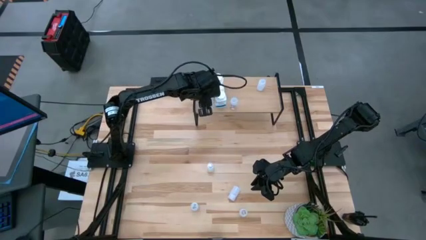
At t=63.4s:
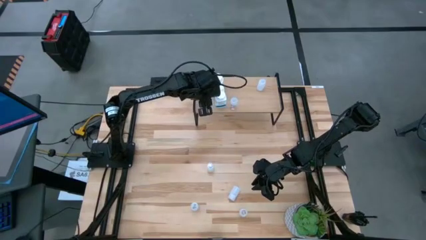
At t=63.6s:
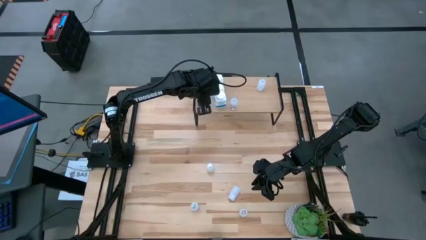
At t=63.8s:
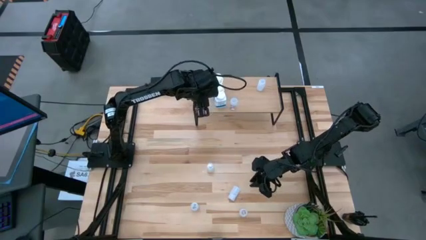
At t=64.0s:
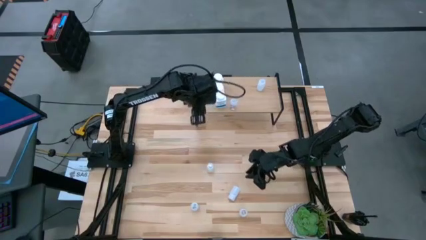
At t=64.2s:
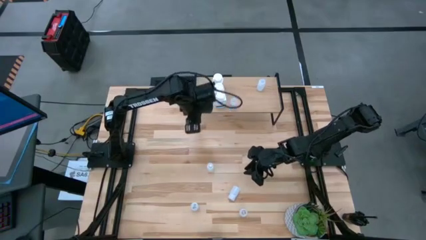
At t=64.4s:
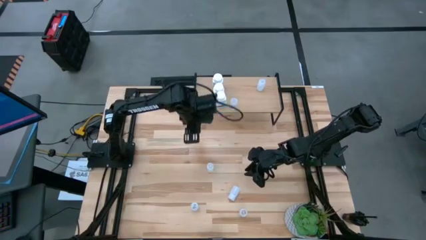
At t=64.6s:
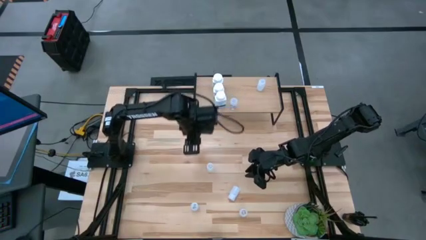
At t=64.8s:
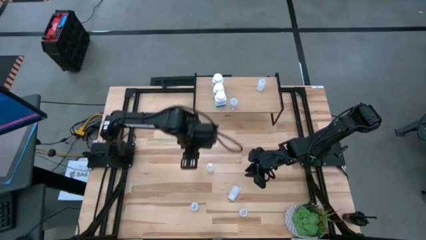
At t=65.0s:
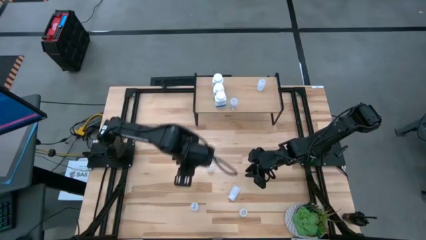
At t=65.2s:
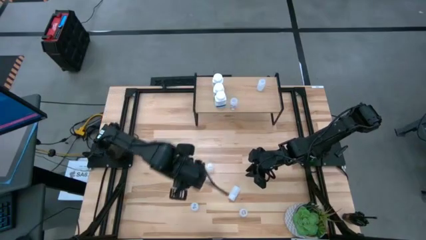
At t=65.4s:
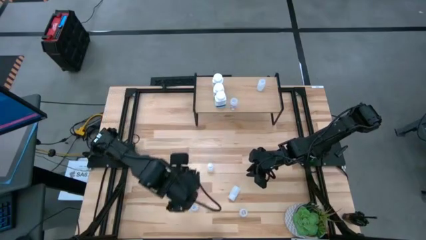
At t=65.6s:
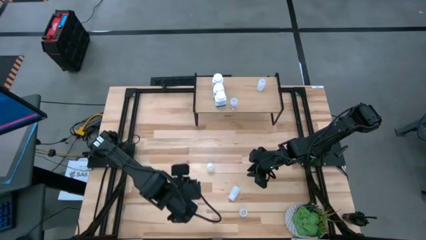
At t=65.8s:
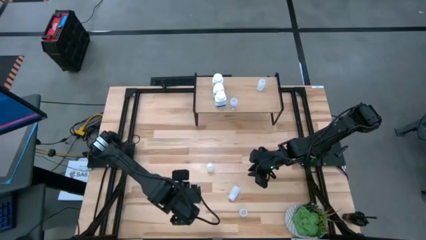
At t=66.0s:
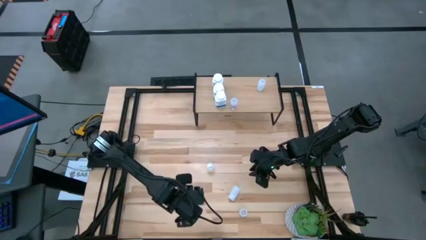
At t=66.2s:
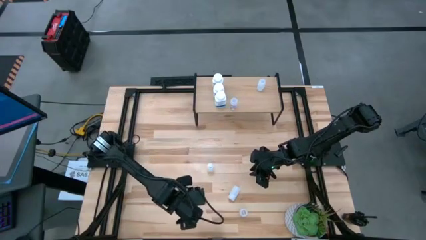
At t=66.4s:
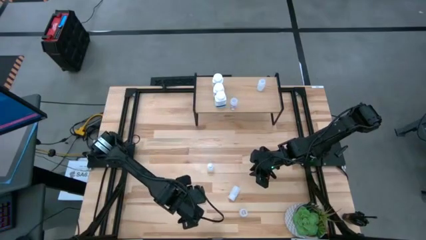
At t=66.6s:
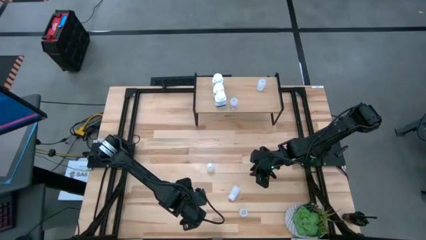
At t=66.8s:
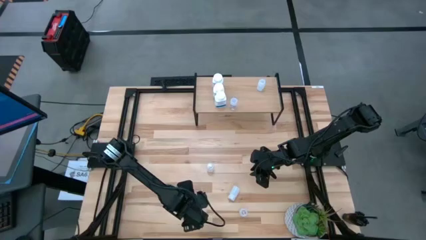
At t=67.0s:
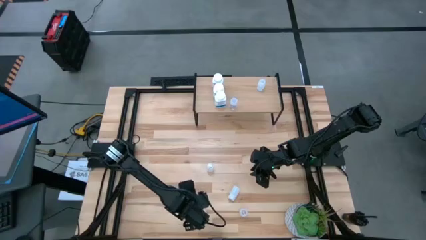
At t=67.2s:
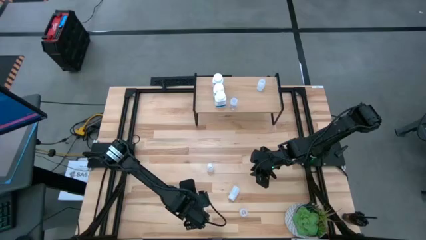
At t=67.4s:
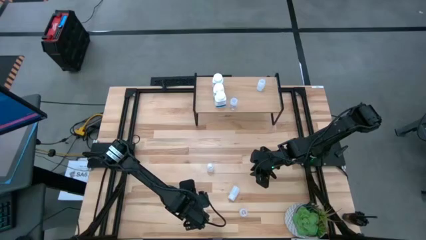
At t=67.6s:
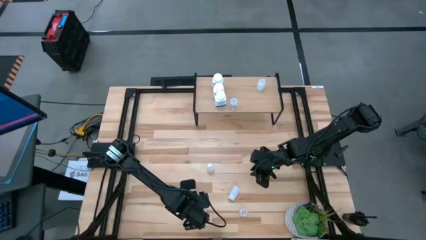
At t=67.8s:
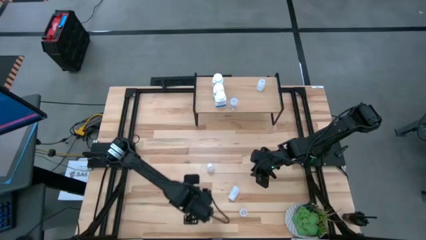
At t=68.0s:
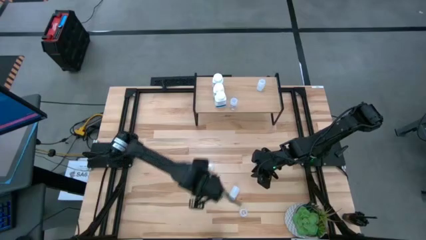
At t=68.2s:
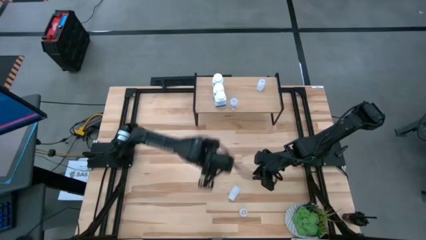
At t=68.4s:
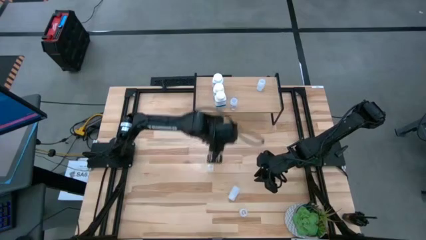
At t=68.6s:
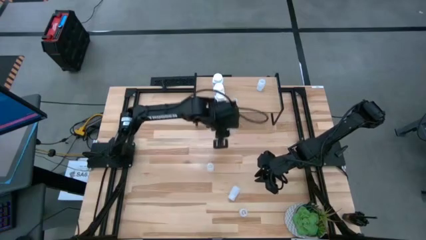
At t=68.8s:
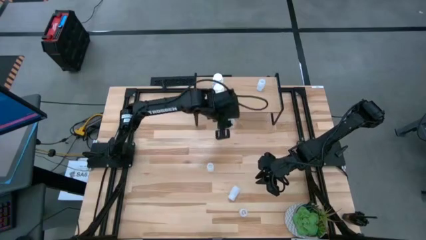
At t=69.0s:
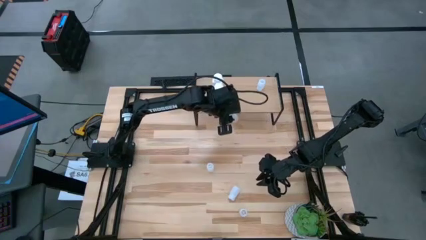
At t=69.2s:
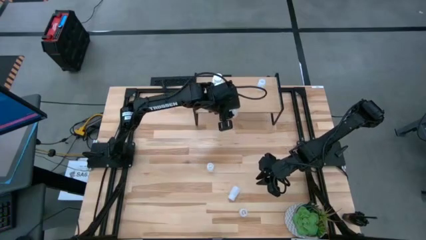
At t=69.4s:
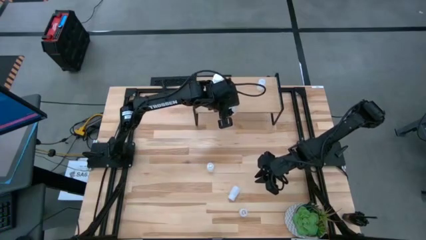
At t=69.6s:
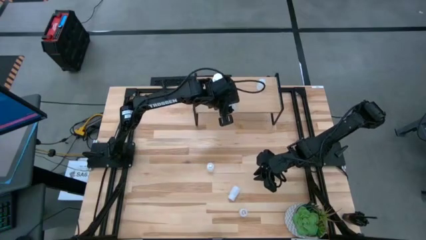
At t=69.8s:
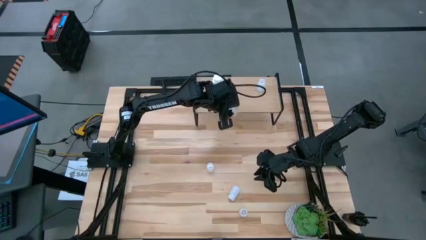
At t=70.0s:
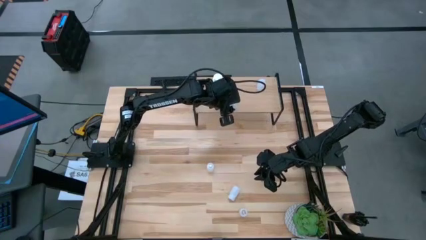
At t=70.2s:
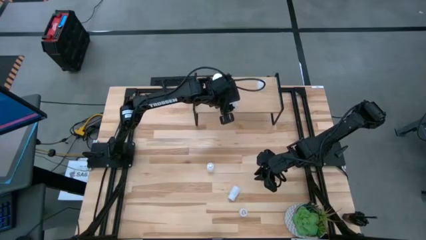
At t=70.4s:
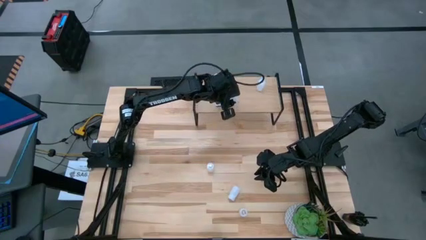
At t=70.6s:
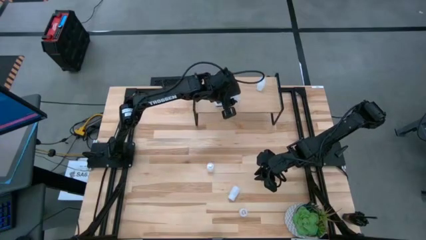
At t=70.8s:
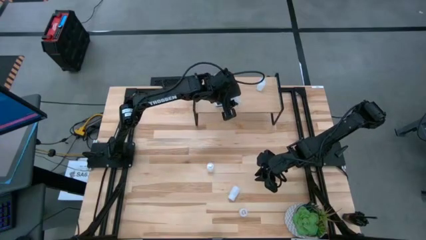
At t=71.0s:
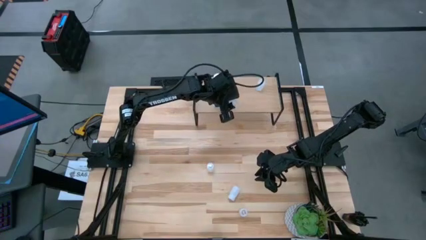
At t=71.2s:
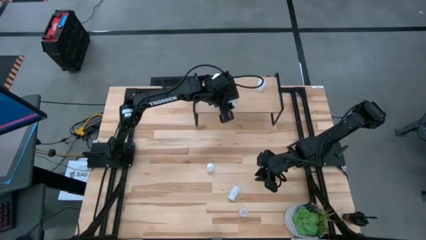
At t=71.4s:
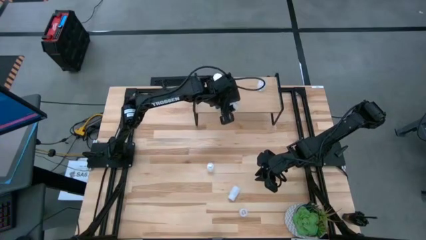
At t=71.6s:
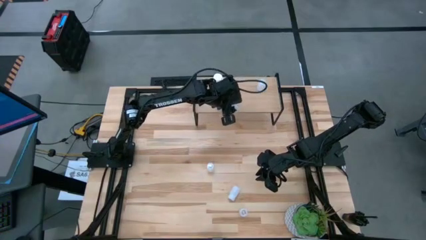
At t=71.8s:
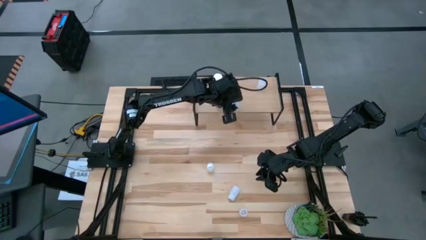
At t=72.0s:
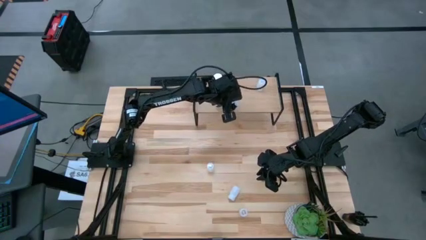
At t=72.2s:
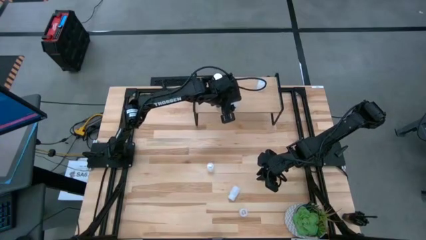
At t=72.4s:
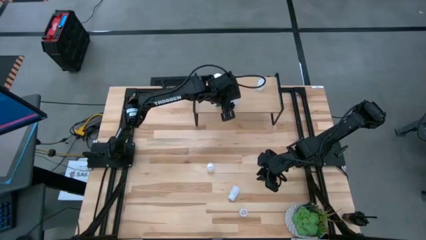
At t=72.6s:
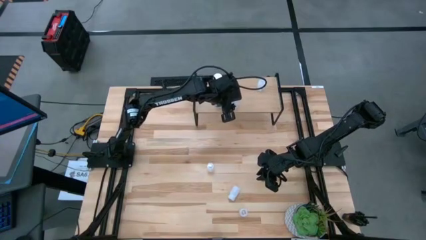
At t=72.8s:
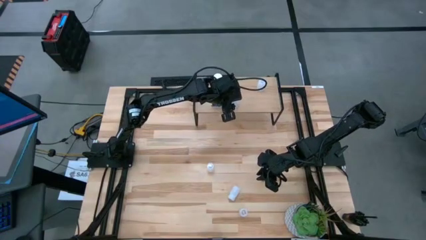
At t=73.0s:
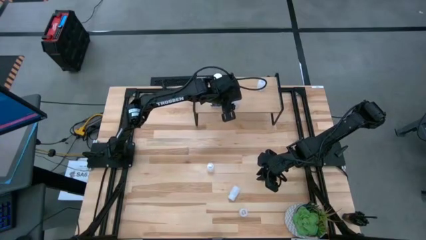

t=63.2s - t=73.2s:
Task: Pick and place medicine bottles onto shelf by color
Put the left transparent pill bottle on the shelf aligned with the other transparent bottle

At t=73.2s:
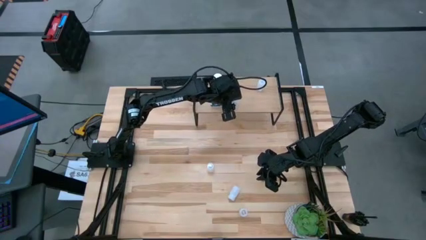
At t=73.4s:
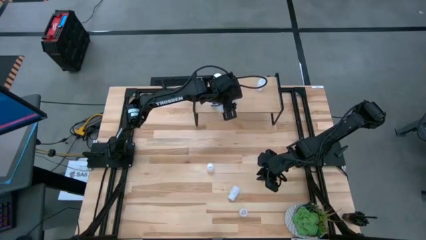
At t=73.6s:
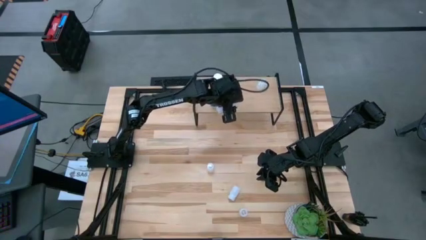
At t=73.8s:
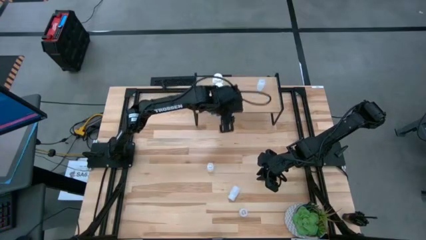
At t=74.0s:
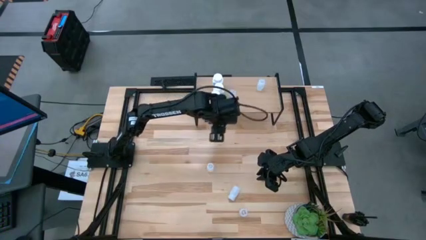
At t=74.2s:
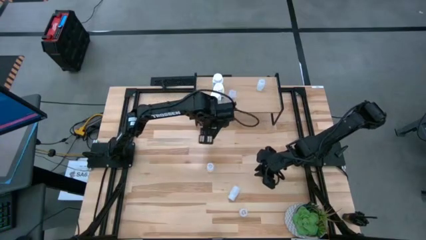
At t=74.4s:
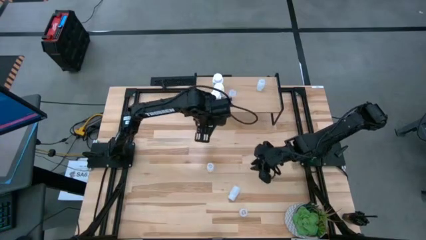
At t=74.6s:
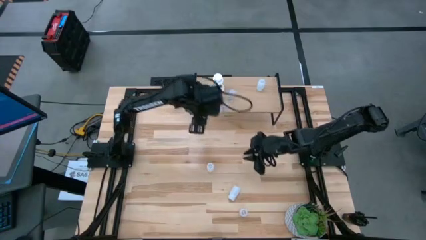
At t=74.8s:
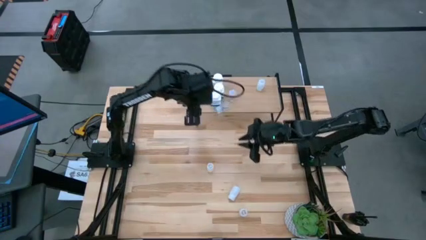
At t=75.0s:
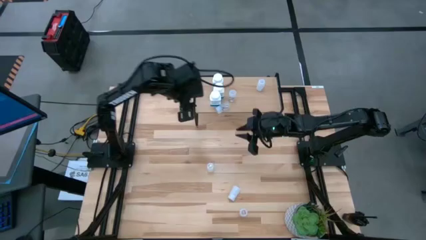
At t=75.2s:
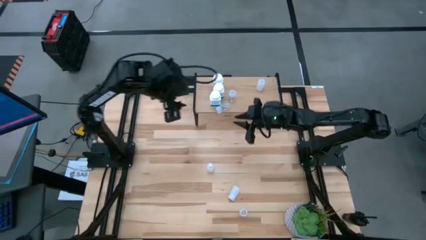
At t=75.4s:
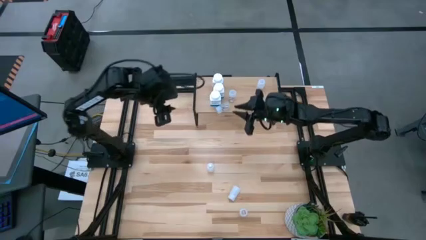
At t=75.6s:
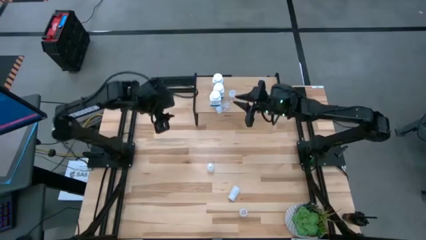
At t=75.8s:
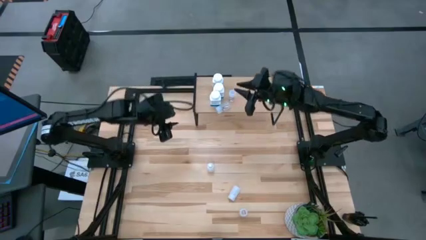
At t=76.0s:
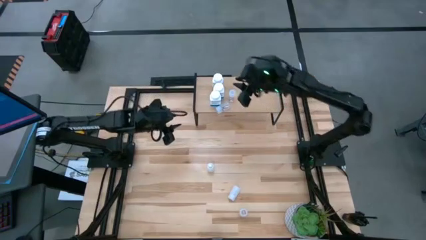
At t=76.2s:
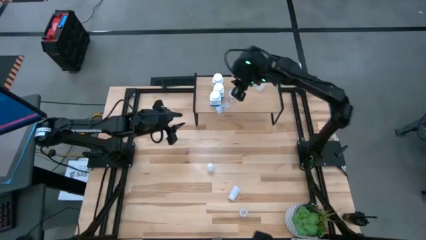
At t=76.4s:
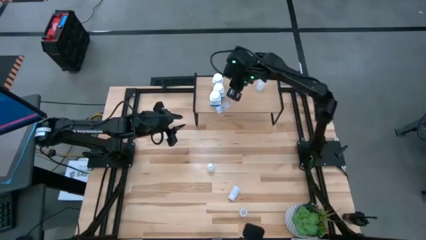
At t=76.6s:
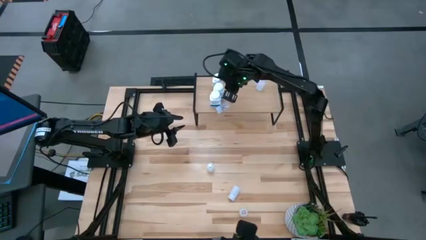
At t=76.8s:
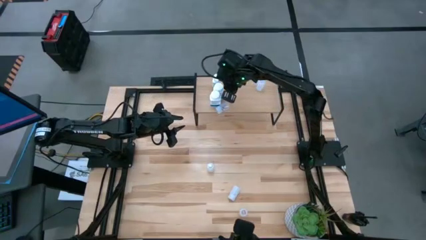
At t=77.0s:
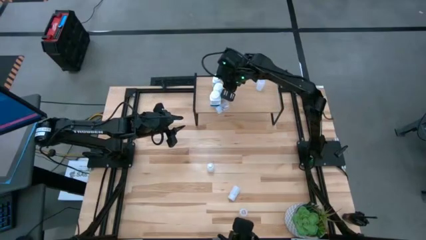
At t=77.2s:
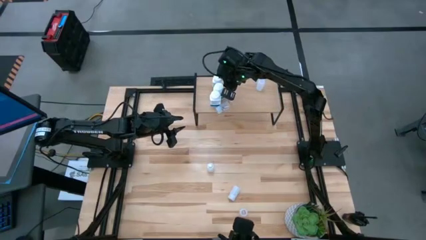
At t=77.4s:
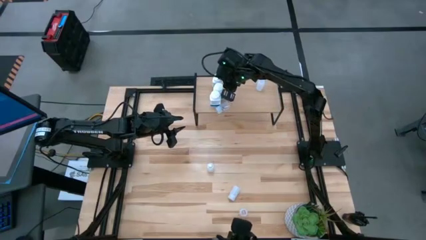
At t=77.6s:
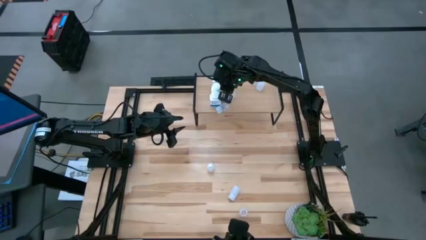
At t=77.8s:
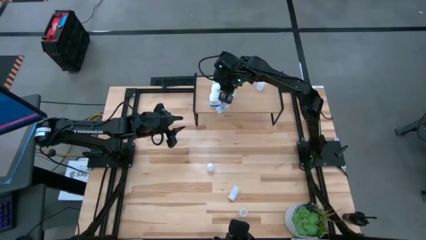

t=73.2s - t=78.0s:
Adjust the white medicine bottle on the shelf

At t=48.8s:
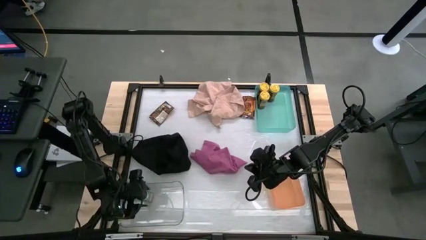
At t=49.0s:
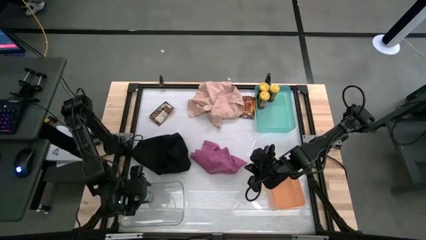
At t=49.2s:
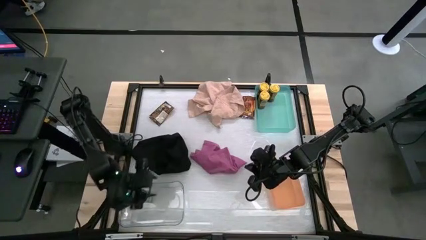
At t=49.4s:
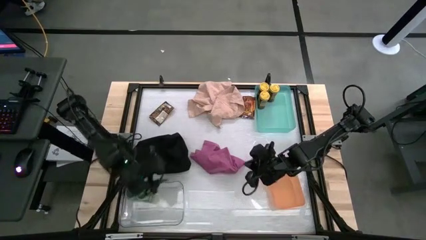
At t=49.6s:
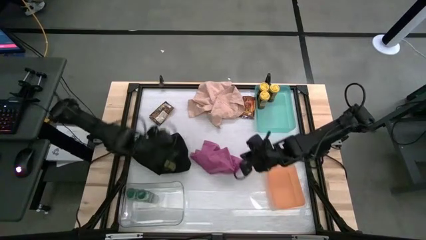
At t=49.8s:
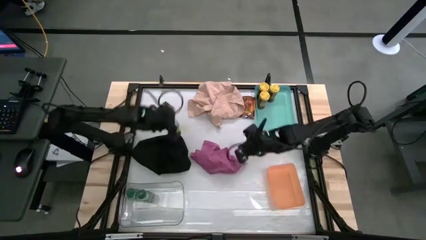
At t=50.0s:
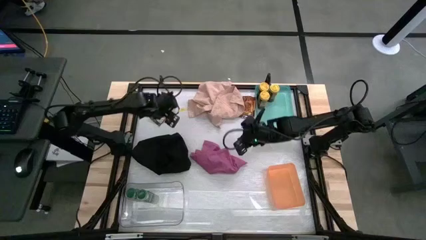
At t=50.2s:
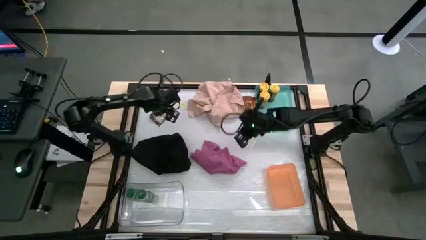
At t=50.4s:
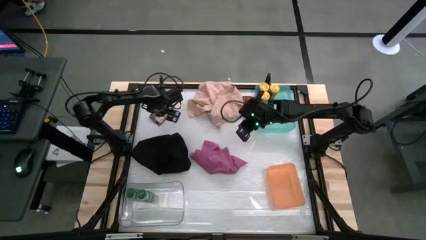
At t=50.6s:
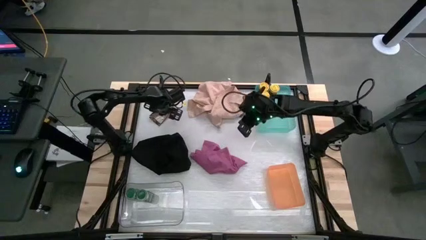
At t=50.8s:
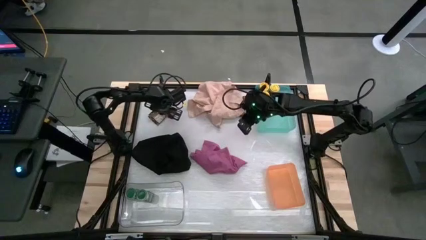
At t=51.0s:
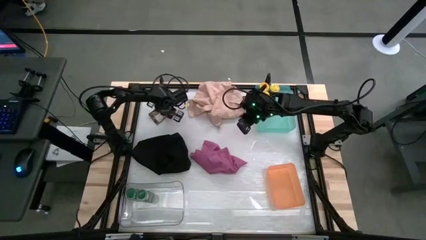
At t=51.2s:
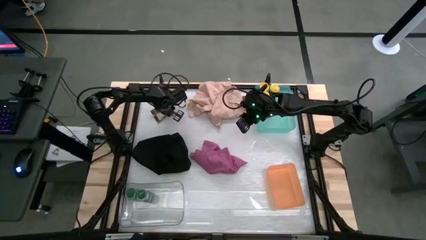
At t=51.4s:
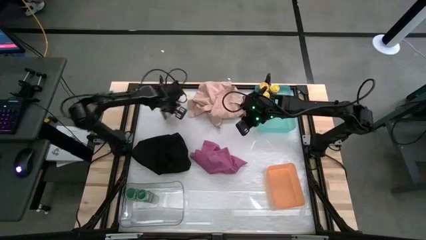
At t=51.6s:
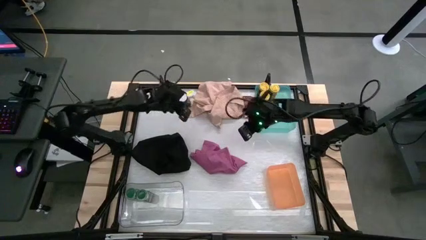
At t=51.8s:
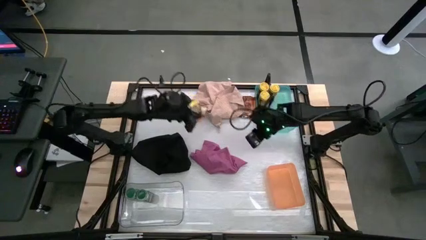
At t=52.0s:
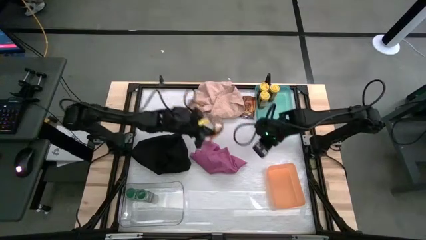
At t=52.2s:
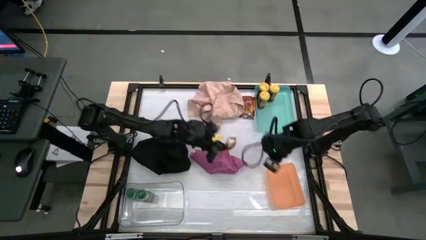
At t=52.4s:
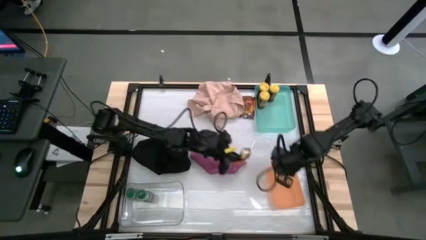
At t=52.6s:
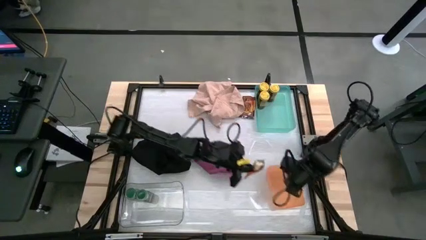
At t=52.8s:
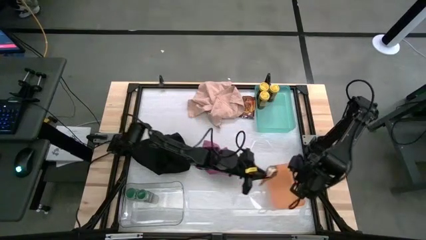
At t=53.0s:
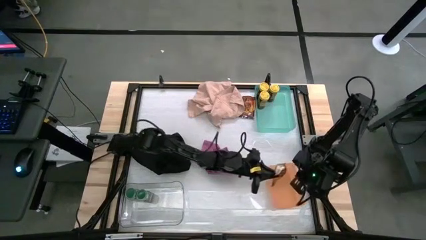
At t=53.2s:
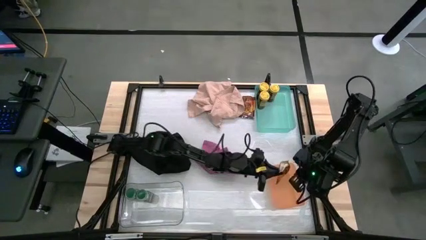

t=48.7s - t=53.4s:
Task: Sort spices by type
Put the left orange seasoning bag into the orange bin
